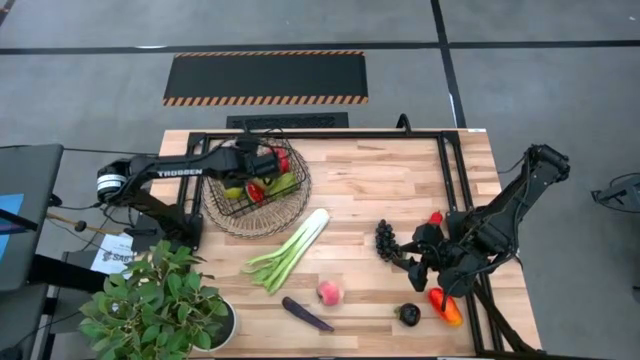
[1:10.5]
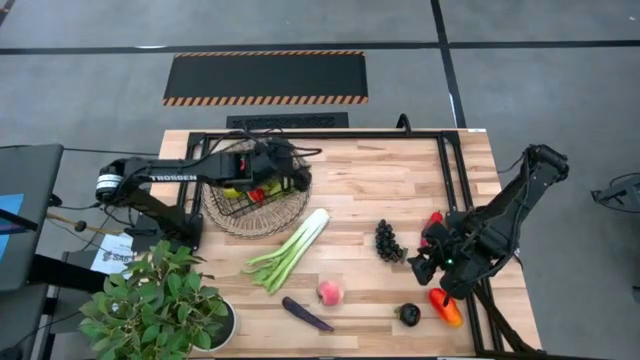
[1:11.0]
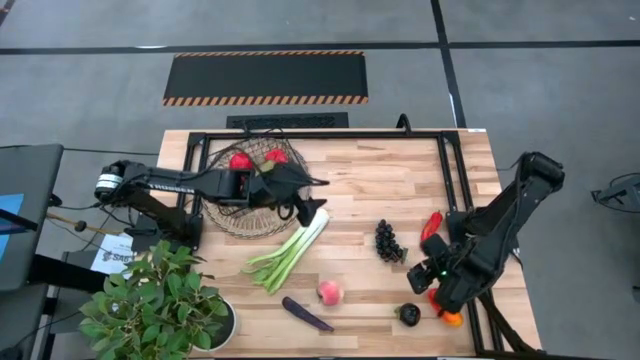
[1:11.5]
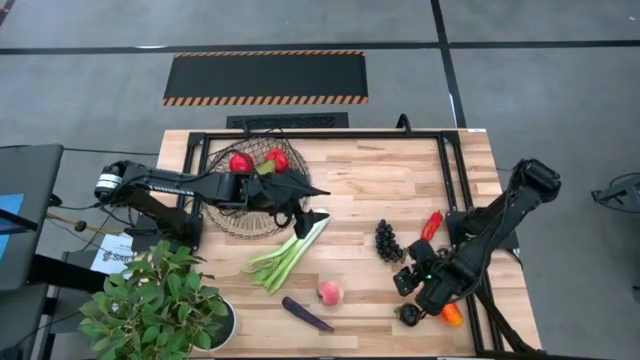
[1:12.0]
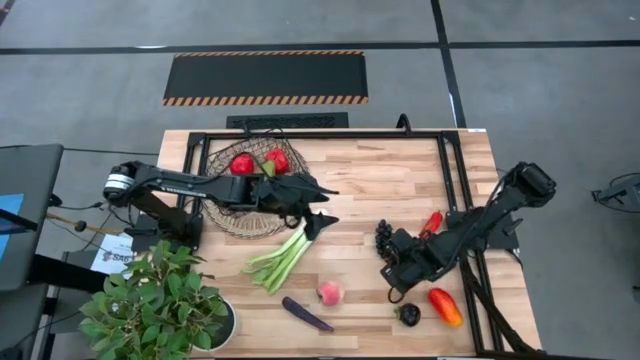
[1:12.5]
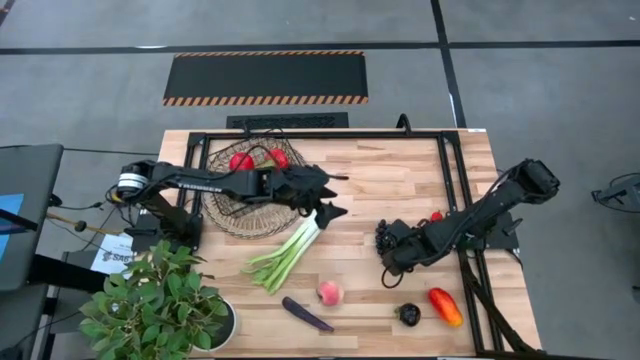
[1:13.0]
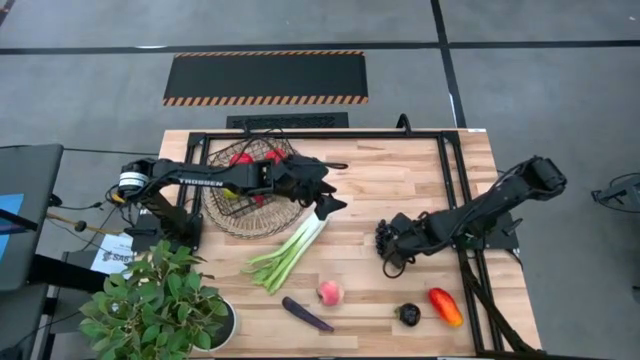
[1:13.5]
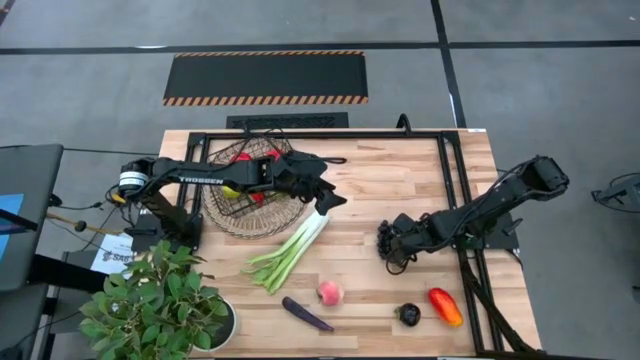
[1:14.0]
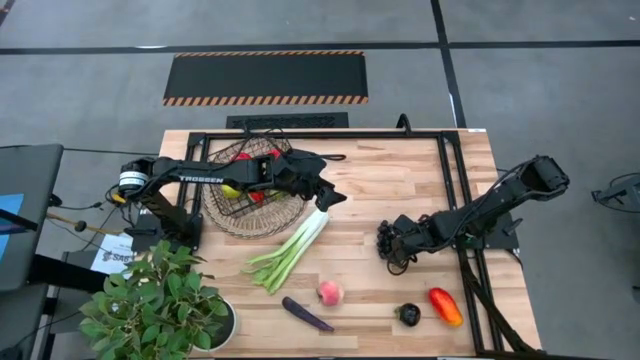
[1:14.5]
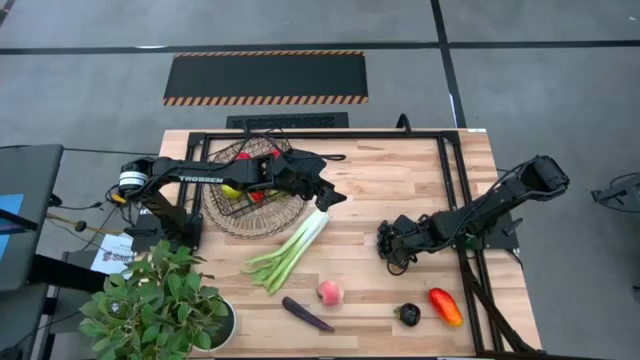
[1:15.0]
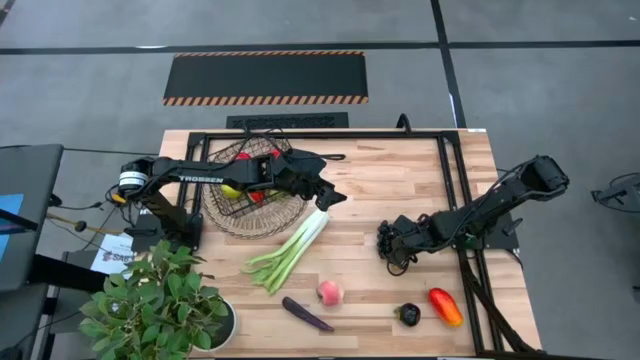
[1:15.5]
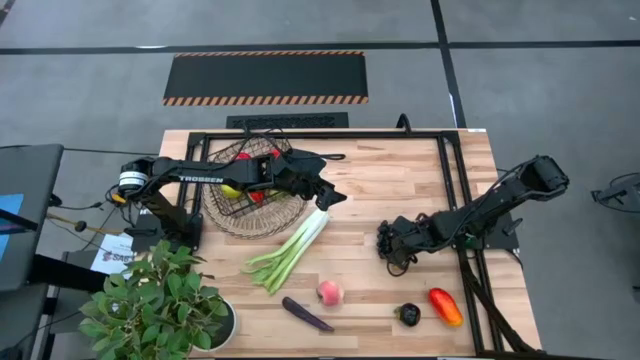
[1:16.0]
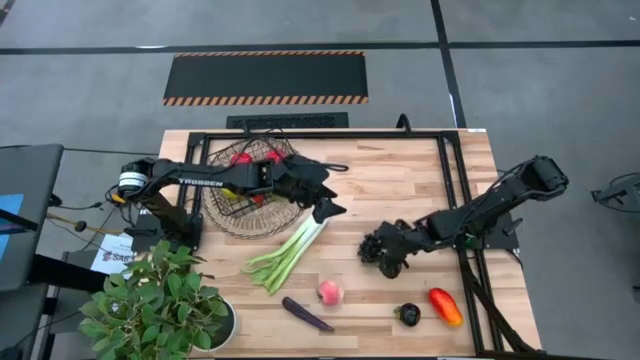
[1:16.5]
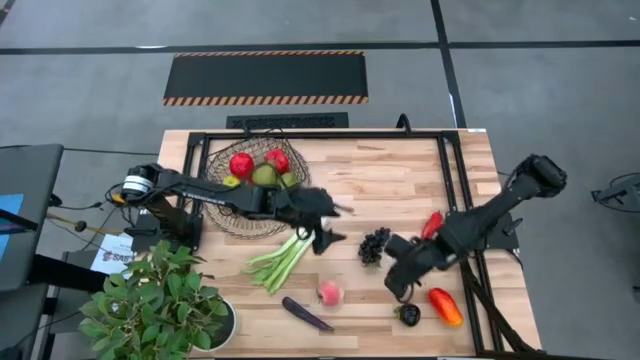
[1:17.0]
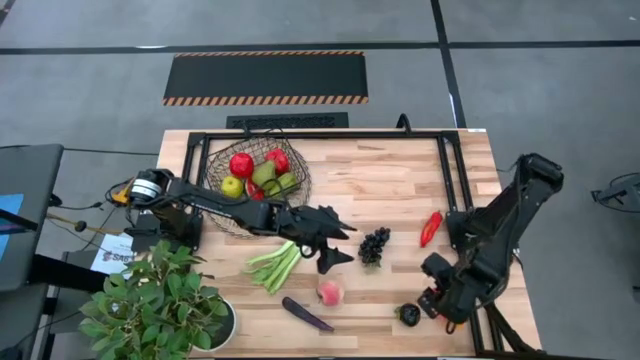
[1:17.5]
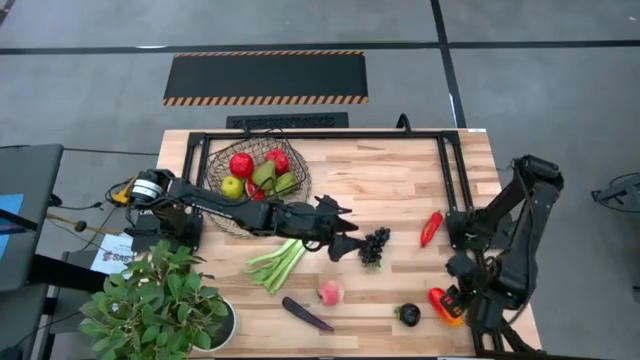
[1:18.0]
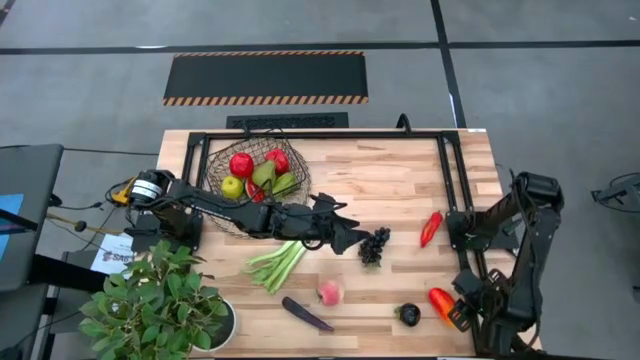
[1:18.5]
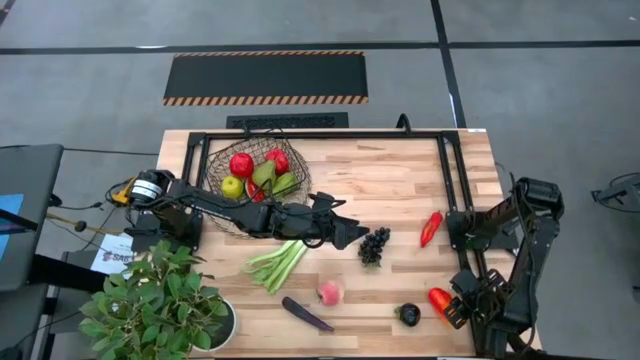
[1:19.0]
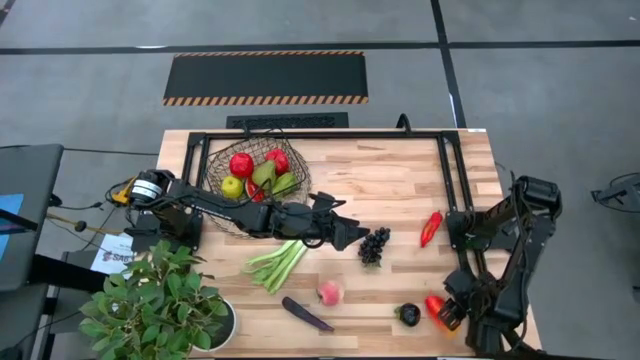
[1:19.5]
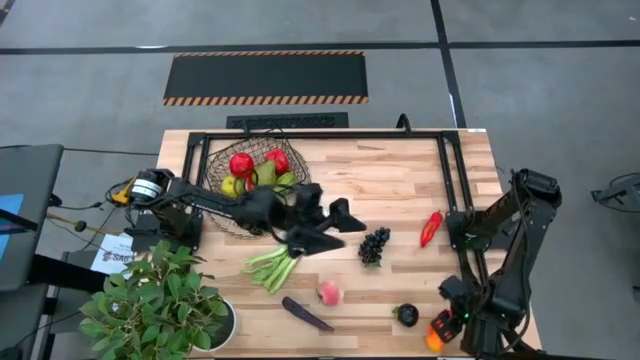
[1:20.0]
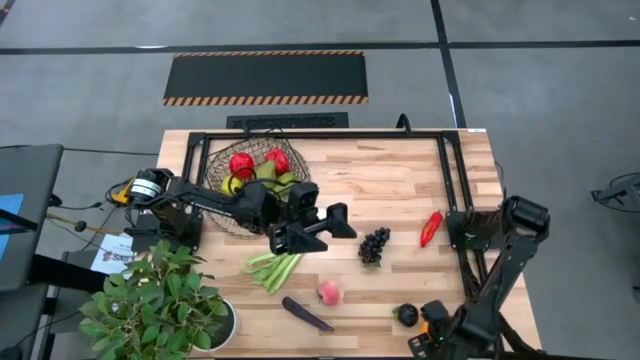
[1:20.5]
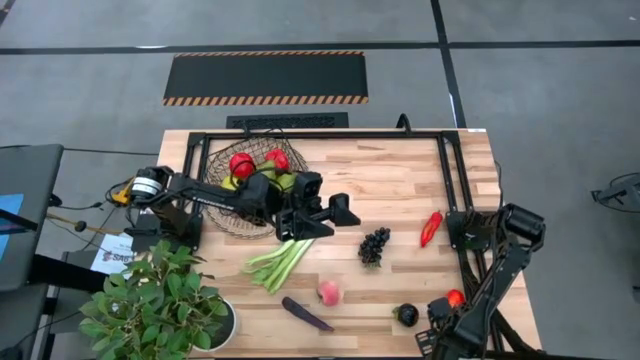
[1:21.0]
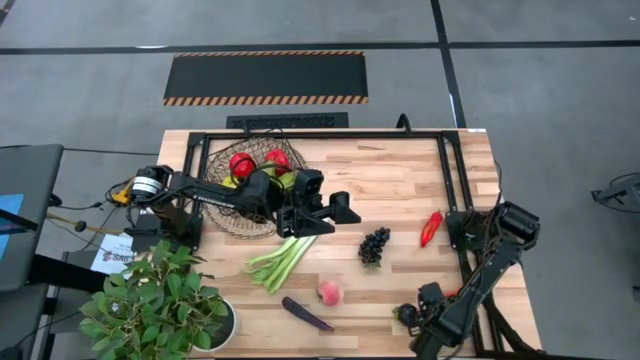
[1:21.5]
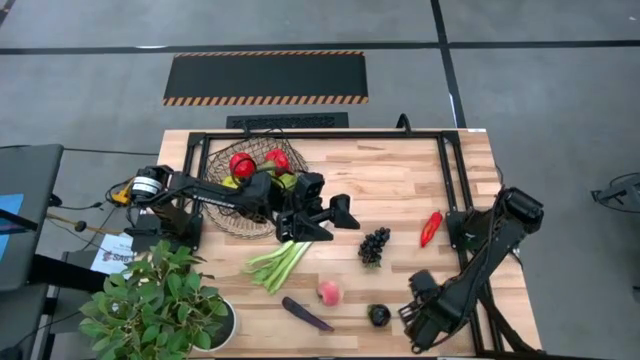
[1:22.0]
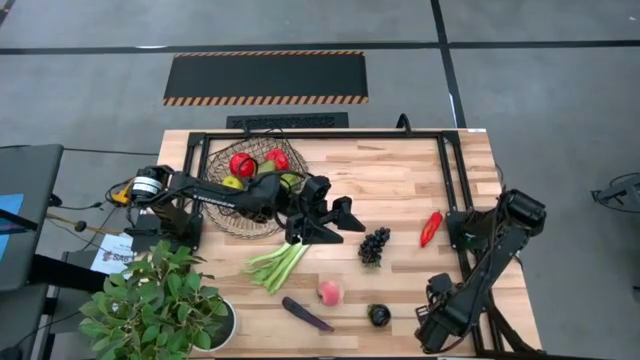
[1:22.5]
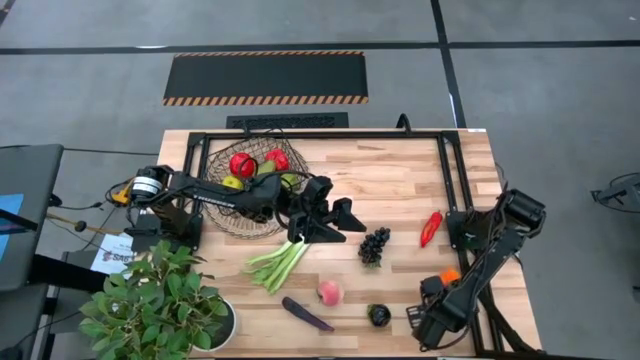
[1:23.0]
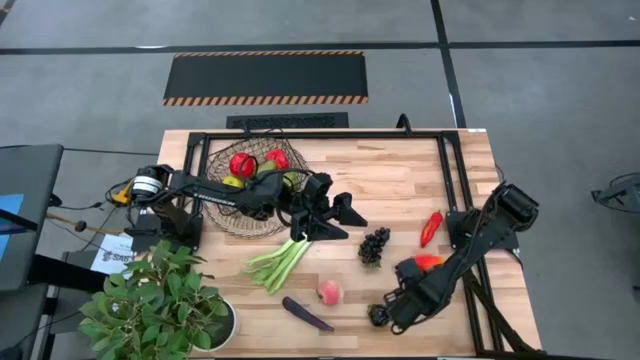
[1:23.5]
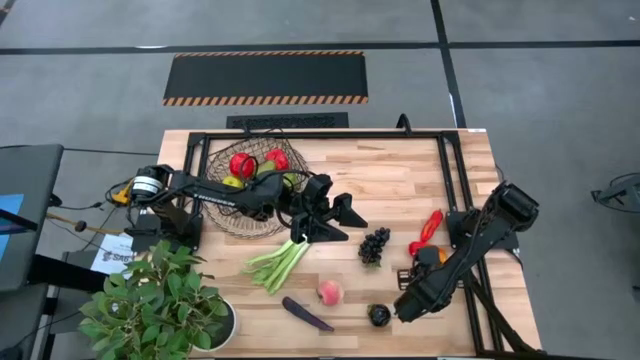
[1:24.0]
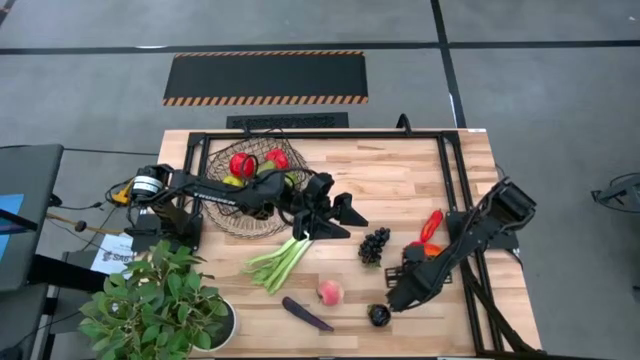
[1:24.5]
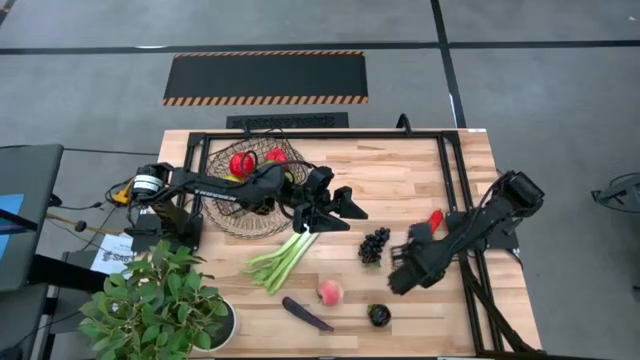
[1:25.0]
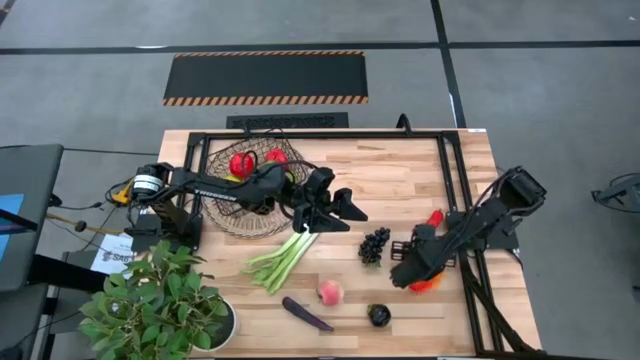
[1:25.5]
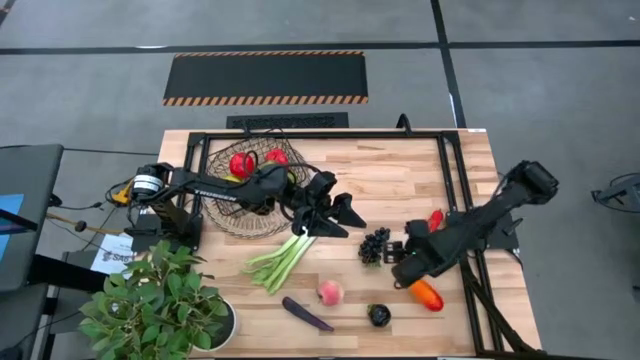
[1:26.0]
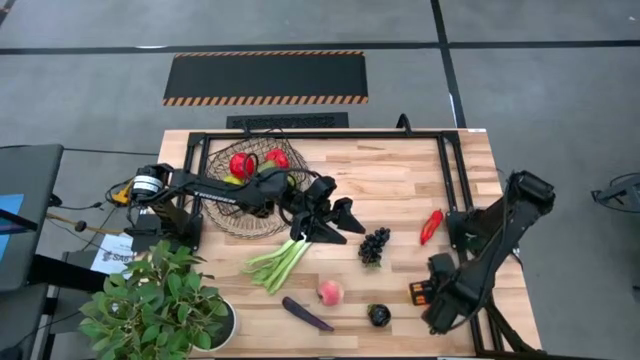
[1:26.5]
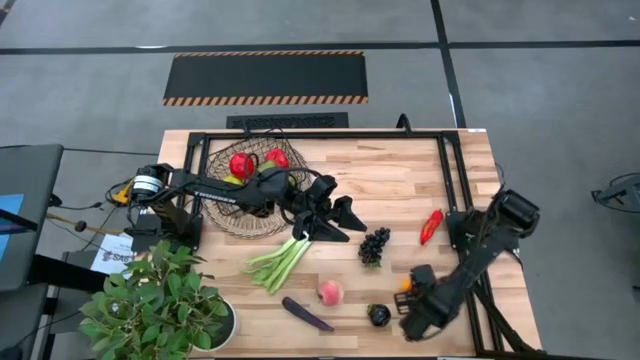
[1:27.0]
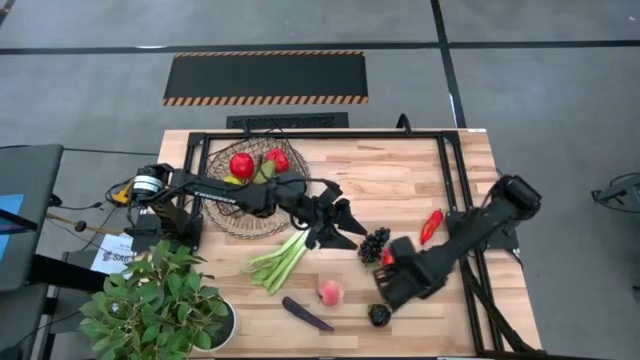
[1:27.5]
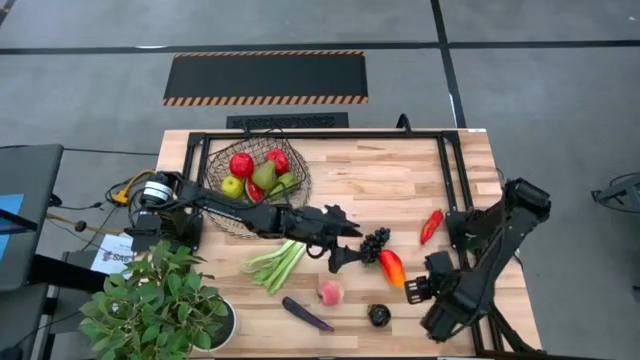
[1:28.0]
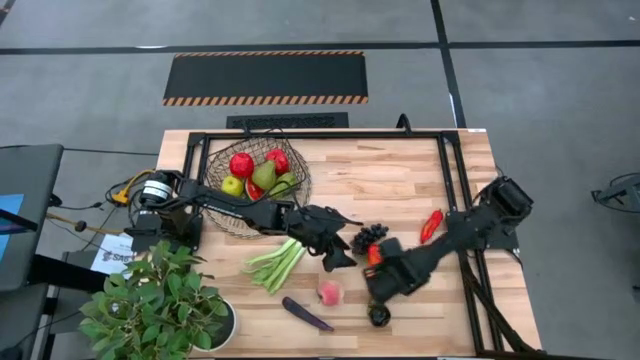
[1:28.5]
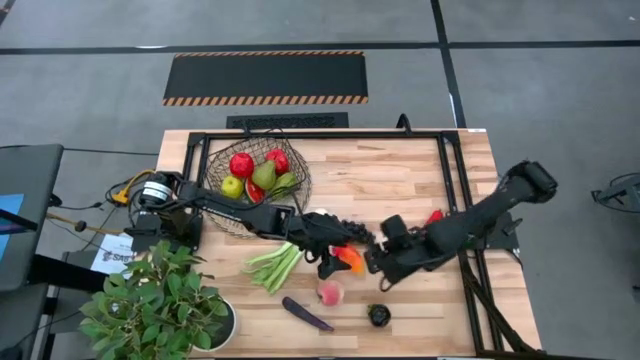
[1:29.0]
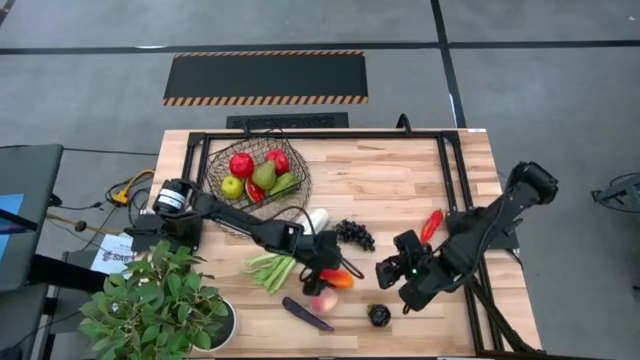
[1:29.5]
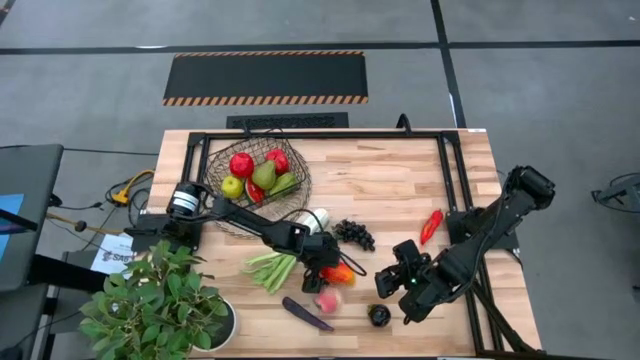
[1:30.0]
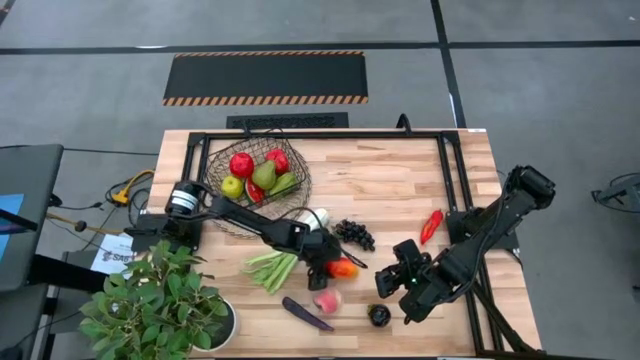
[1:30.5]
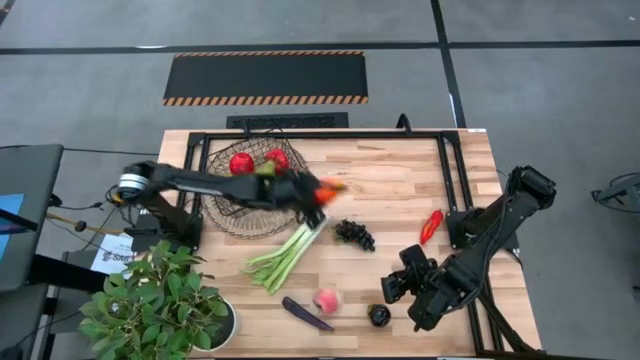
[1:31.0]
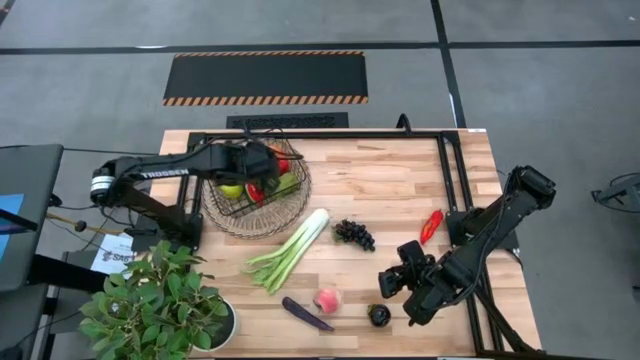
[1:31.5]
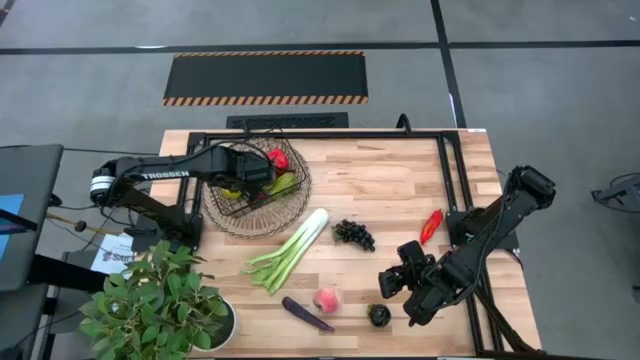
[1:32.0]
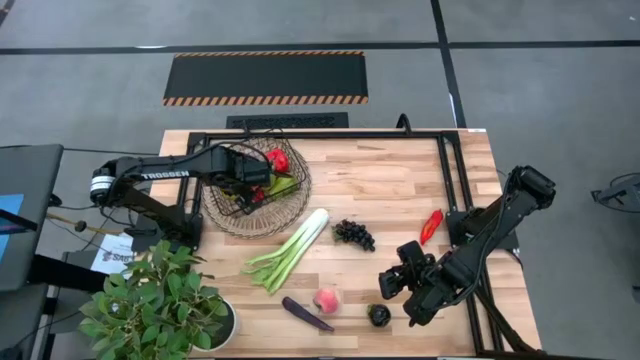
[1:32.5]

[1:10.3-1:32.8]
Task: Build produce basket
Put the orange mango into the wire basket
